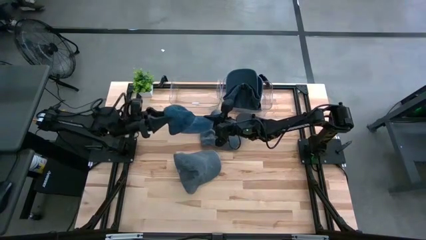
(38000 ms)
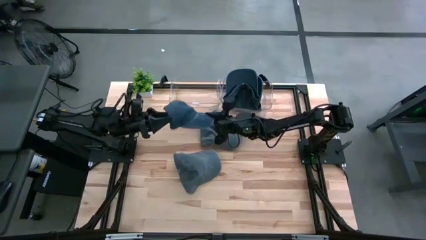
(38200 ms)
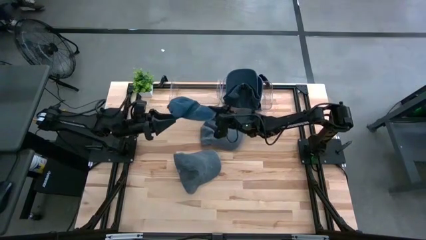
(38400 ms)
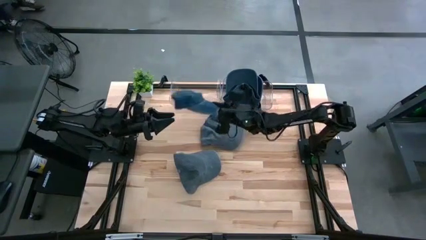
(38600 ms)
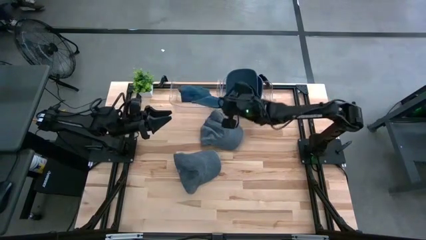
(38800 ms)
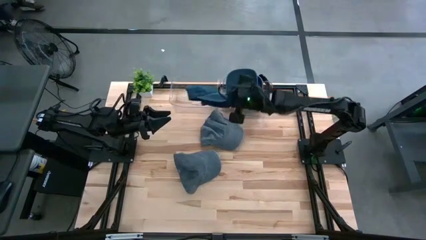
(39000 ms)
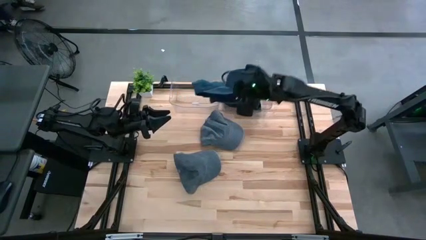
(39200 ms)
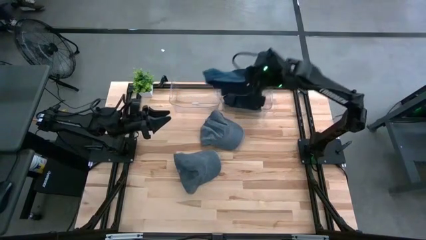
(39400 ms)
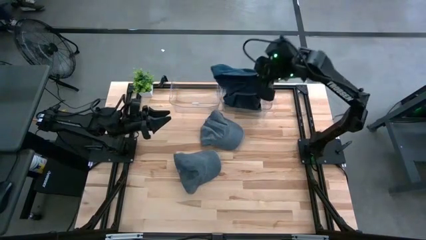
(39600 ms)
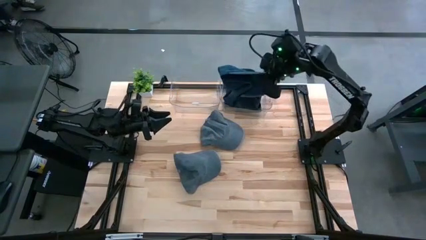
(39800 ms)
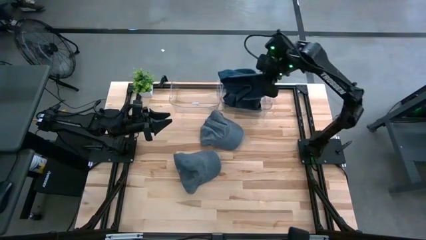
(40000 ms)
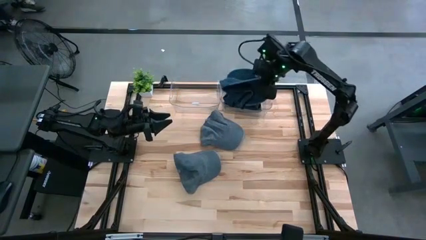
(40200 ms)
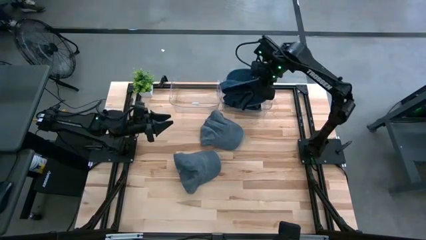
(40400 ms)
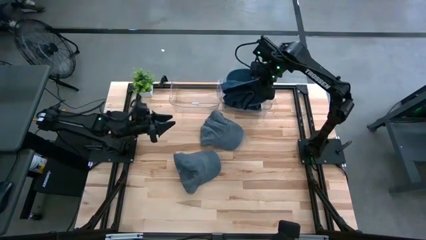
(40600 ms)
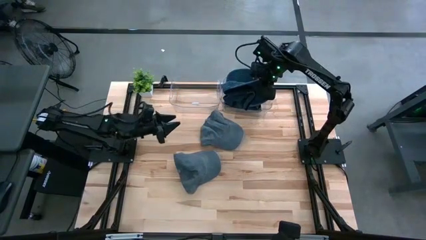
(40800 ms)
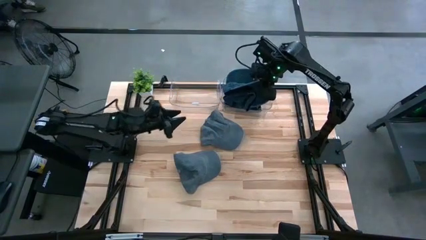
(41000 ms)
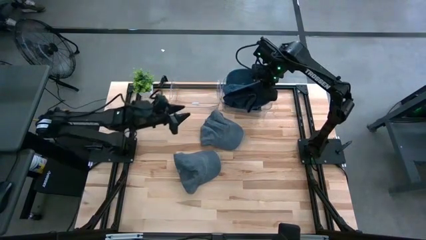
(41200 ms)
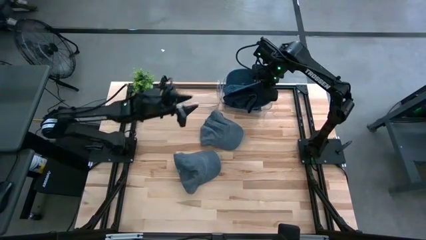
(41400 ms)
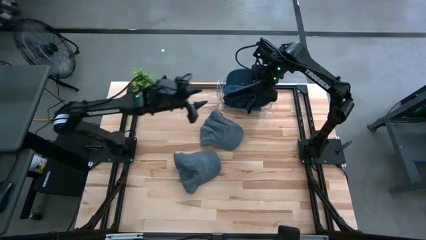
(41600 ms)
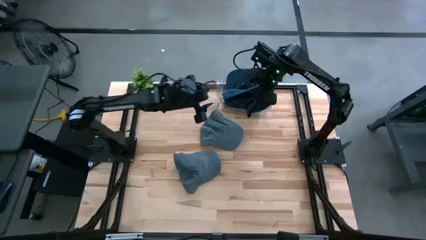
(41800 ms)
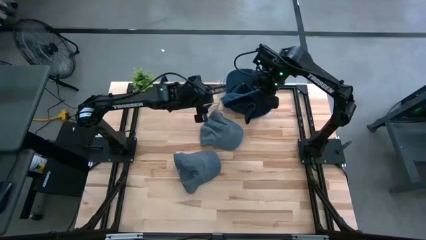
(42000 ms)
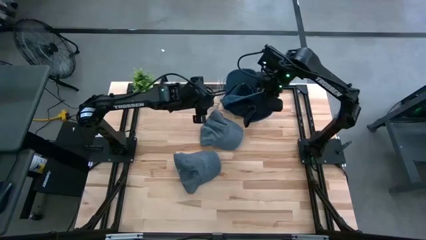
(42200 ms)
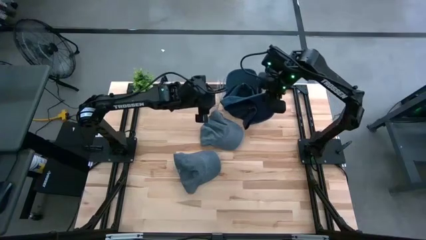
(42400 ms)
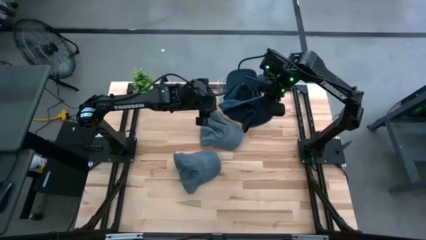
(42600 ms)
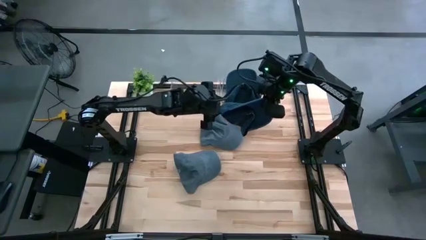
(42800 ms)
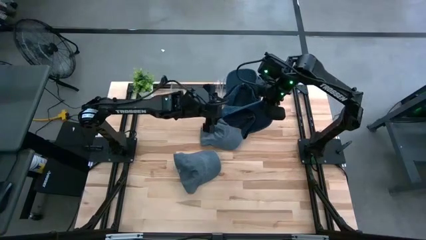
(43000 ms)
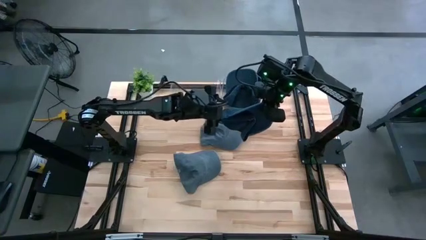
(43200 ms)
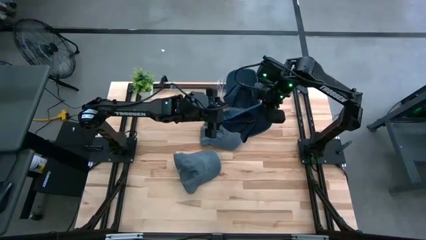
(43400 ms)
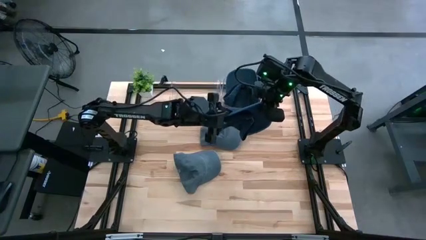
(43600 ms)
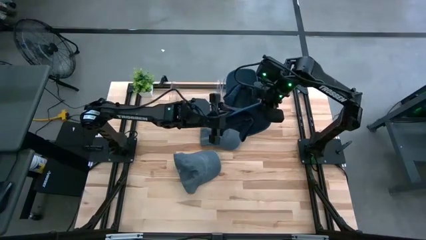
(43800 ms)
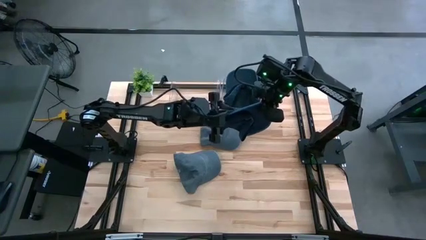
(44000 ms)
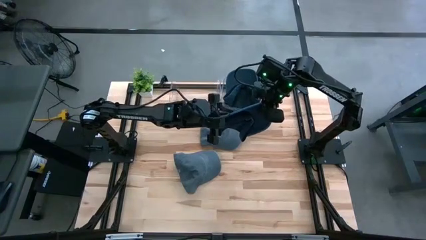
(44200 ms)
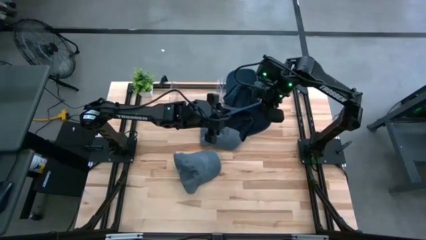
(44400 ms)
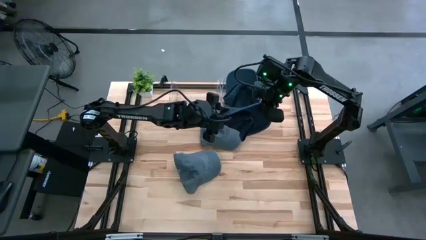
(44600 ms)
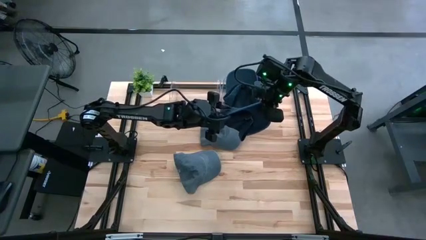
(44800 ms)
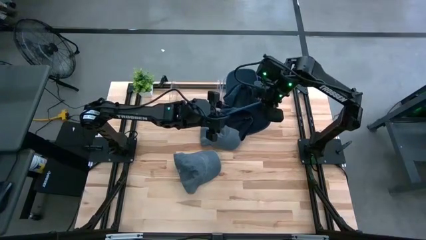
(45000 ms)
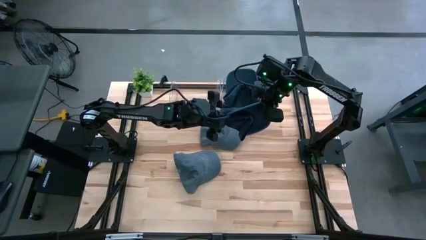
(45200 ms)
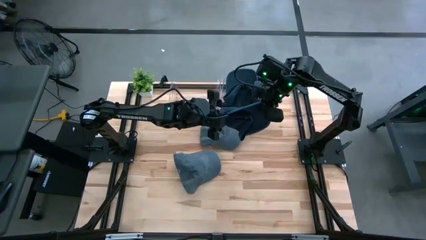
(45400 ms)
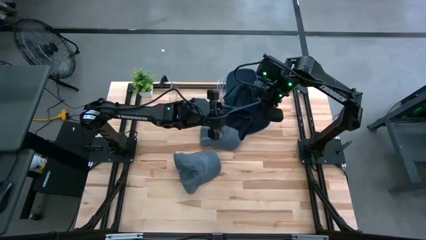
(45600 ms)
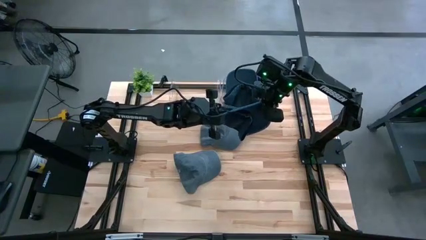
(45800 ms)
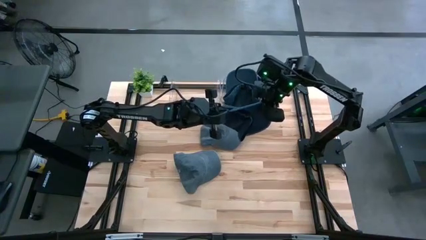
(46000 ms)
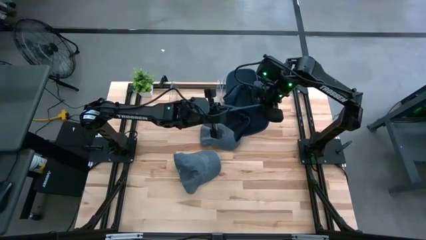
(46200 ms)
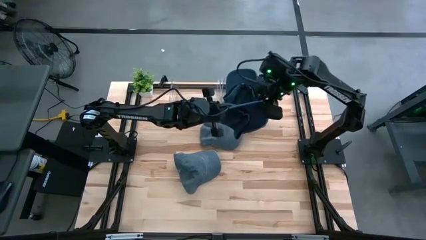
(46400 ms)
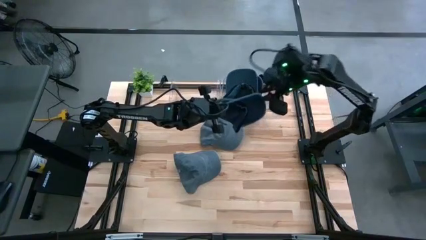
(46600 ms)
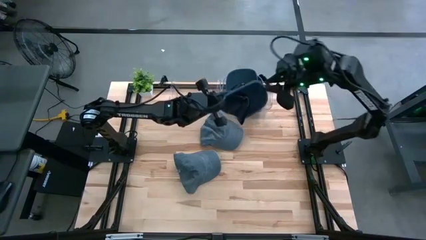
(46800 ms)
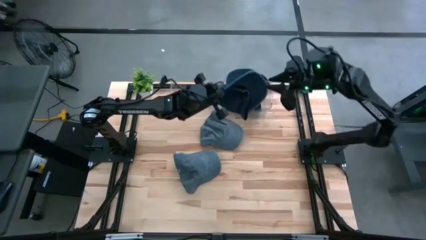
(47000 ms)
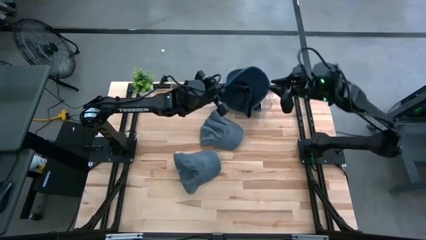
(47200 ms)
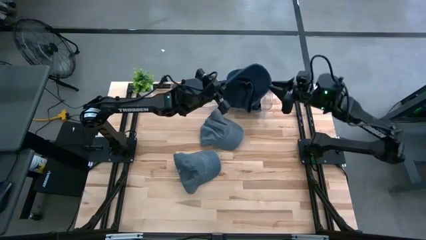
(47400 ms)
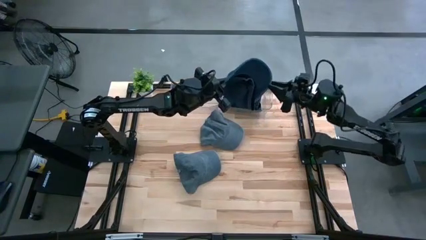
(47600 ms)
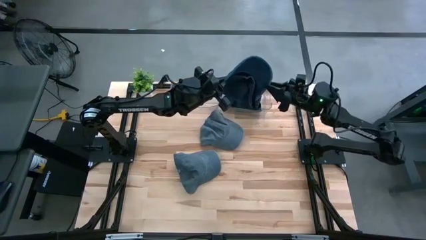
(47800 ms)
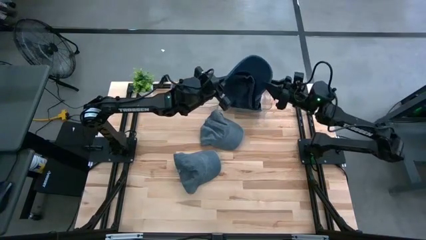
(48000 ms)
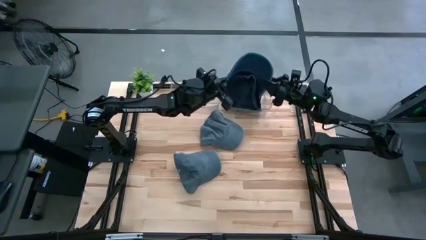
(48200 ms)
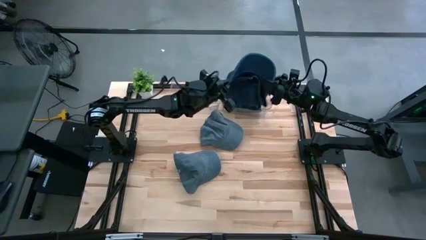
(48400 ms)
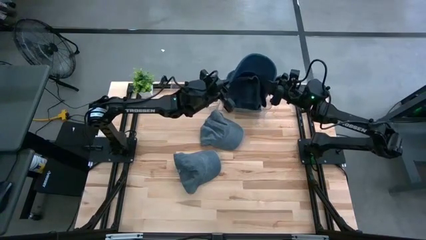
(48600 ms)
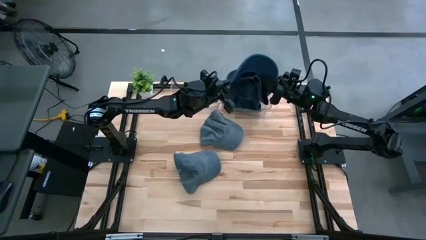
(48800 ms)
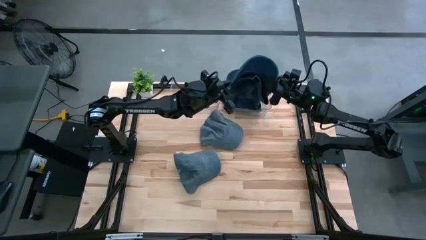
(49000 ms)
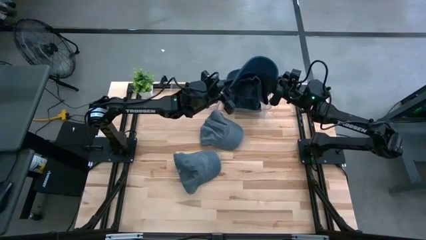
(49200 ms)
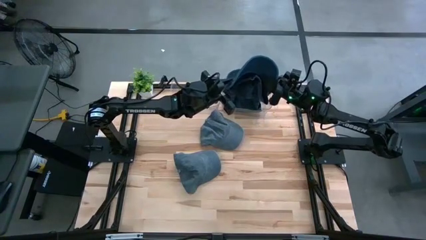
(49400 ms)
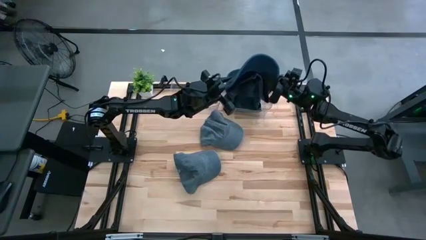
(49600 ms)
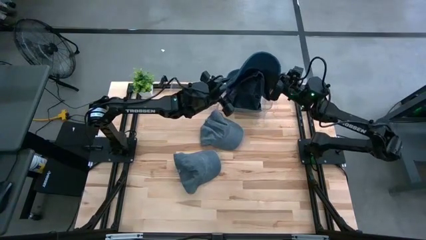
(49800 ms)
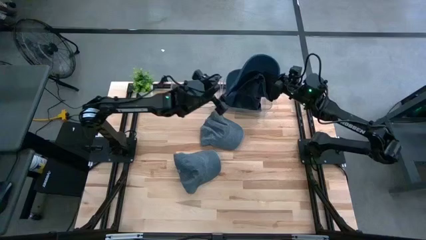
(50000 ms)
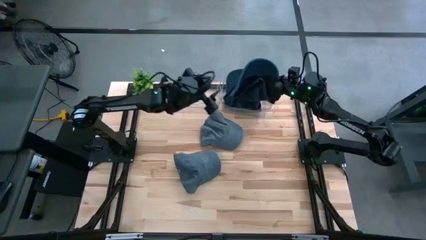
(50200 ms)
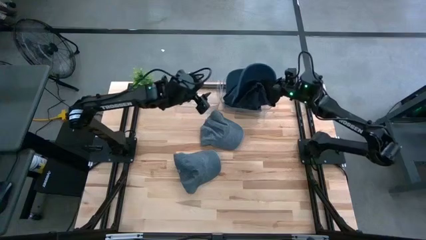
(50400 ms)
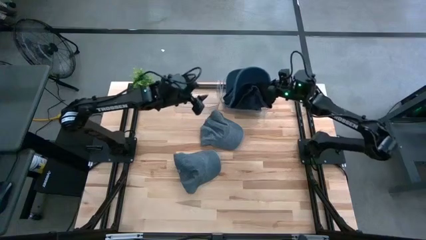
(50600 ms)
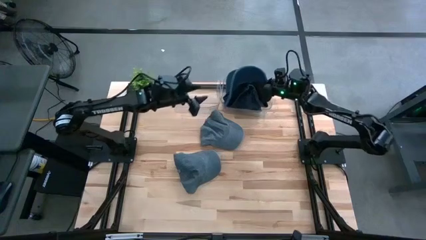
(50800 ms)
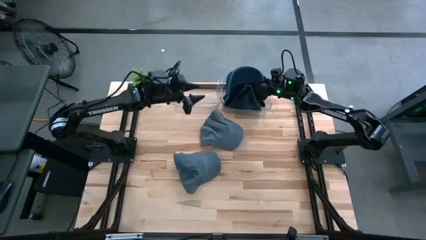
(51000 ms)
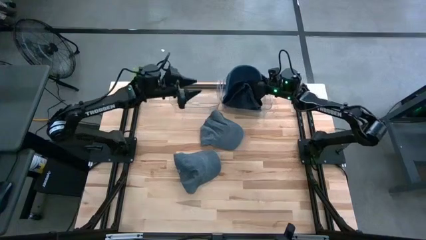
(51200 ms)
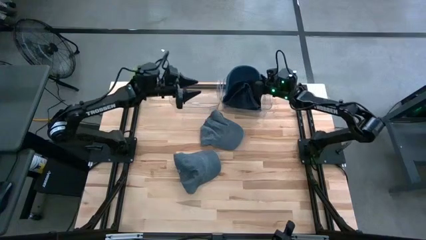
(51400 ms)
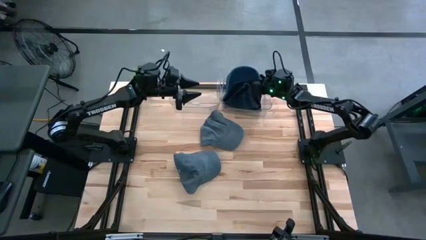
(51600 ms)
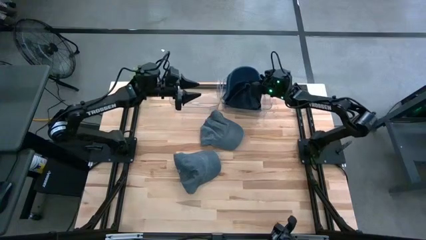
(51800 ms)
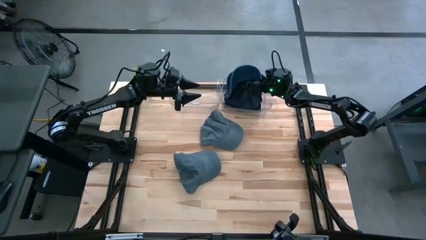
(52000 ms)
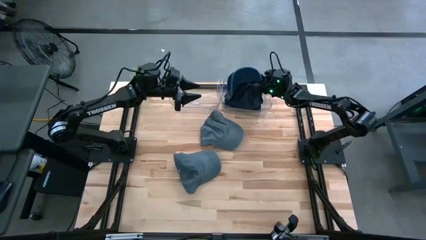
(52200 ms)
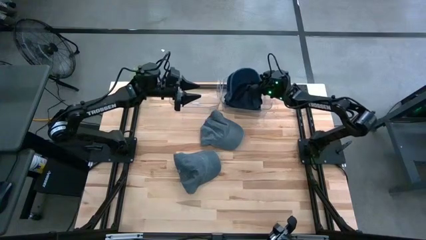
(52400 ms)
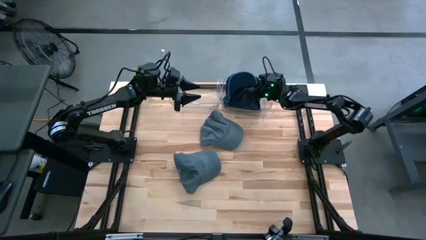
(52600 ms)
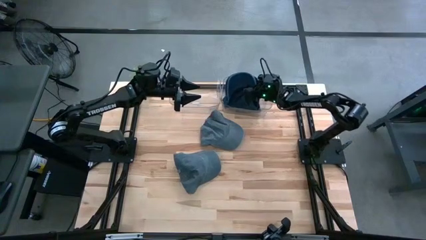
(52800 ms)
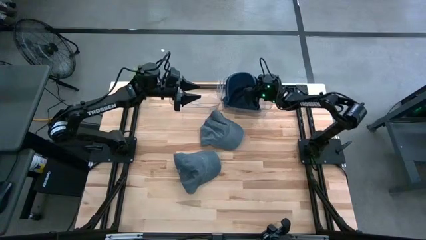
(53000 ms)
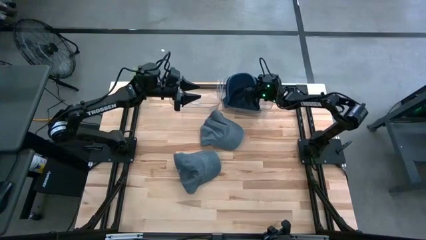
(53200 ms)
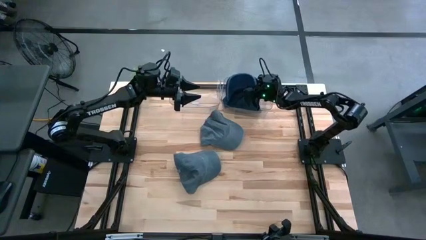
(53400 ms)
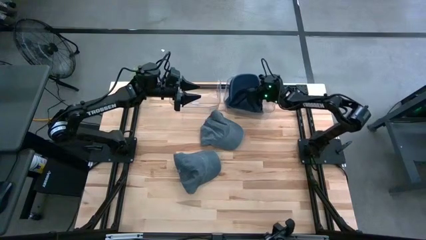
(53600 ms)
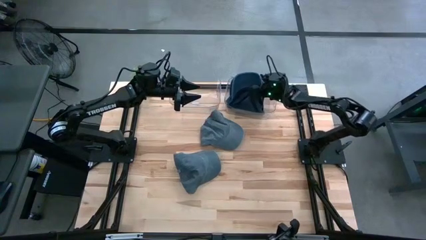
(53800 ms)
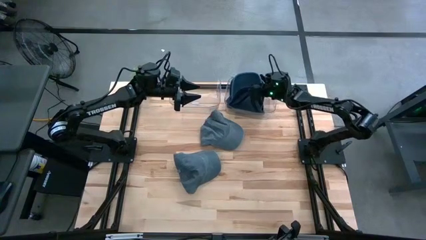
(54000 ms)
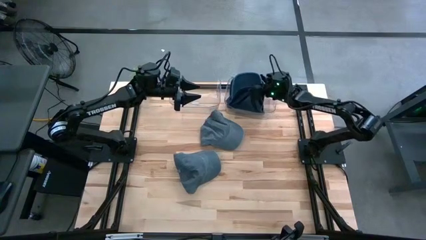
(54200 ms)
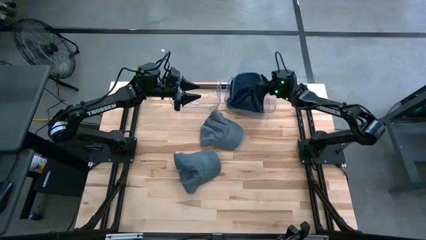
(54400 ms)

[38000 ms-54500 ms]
Task: Pick & Place hat
Put the blue cap into the right transparent bin
